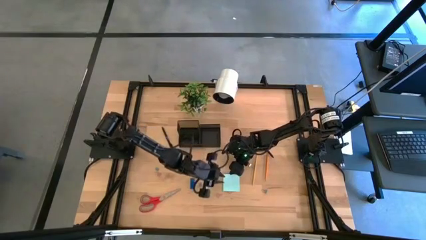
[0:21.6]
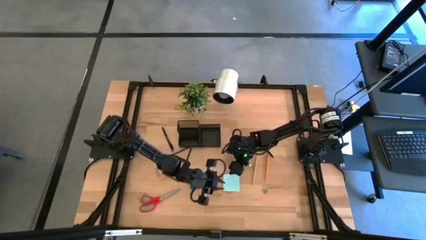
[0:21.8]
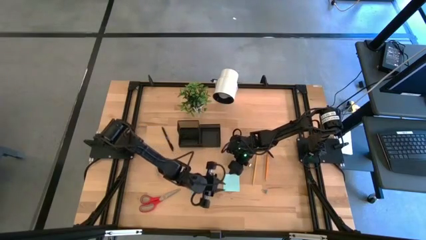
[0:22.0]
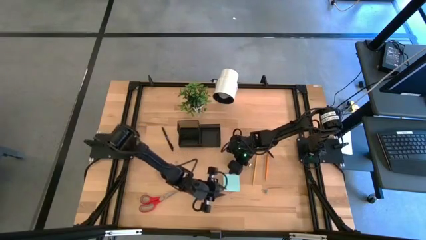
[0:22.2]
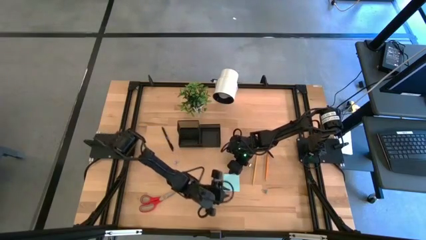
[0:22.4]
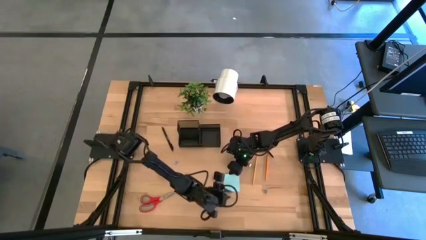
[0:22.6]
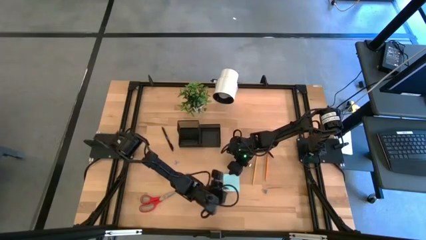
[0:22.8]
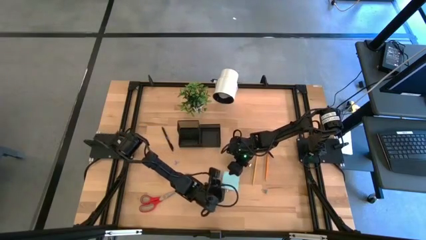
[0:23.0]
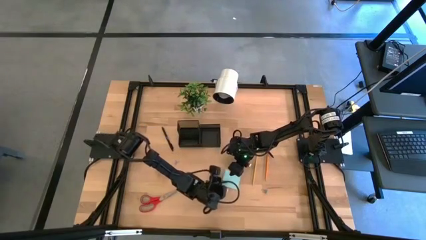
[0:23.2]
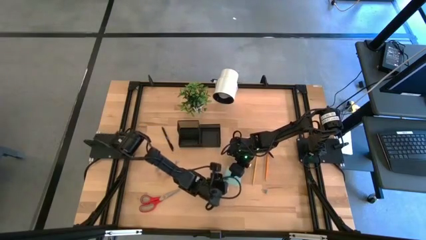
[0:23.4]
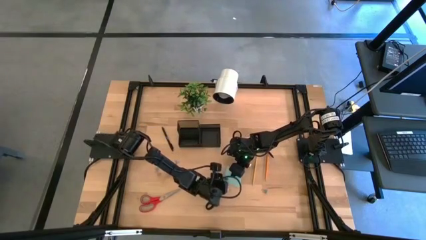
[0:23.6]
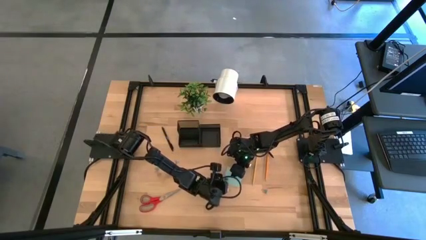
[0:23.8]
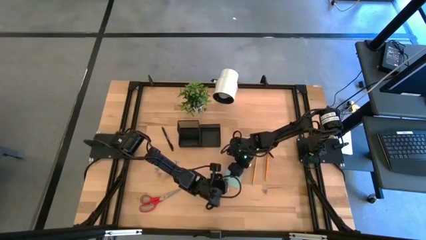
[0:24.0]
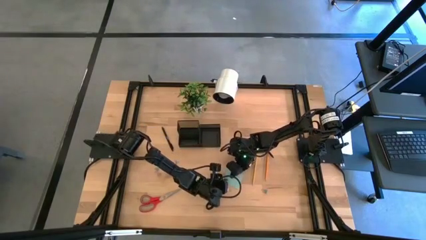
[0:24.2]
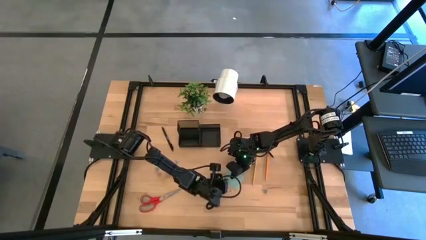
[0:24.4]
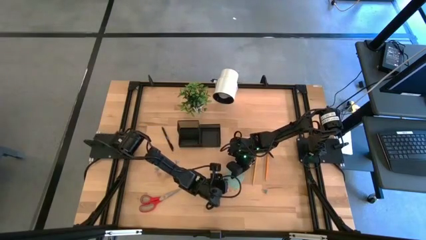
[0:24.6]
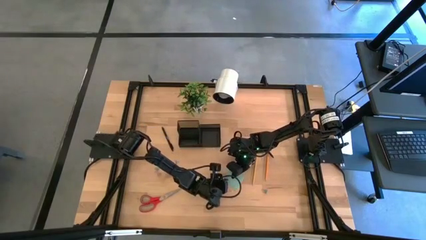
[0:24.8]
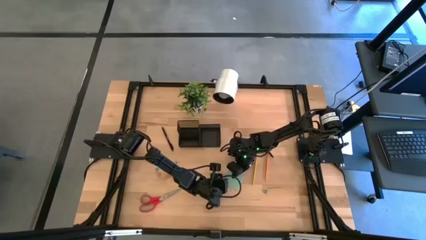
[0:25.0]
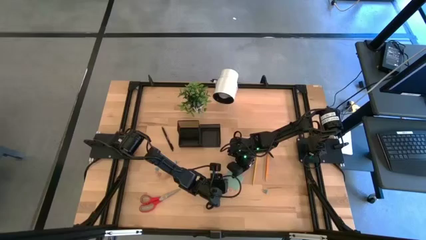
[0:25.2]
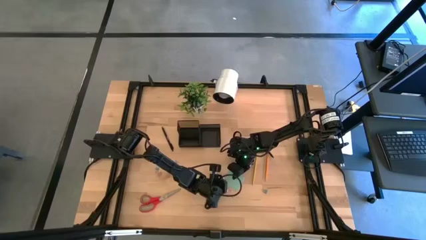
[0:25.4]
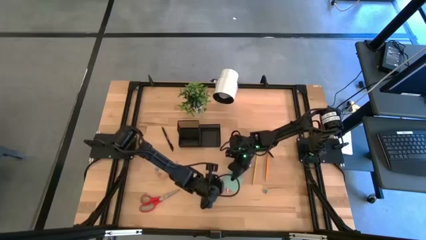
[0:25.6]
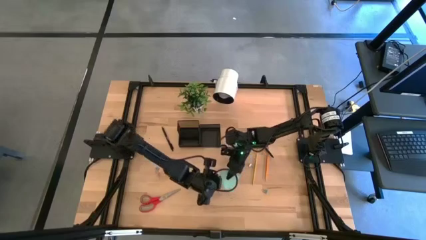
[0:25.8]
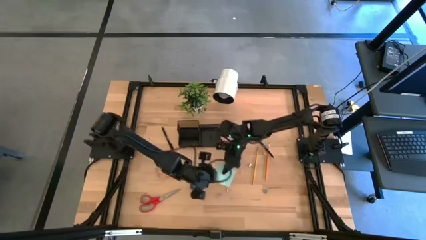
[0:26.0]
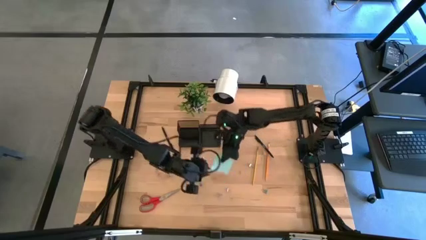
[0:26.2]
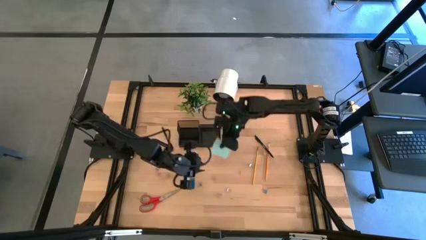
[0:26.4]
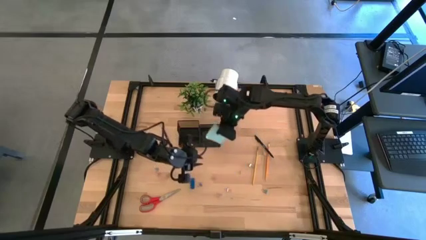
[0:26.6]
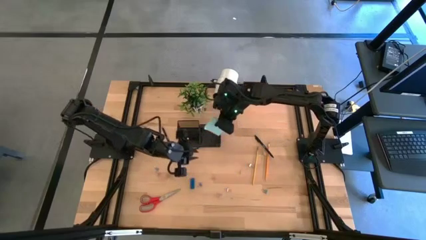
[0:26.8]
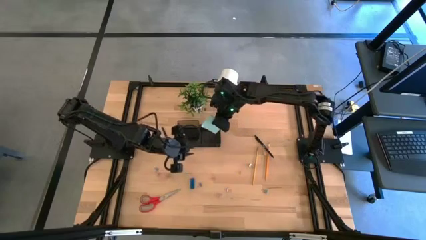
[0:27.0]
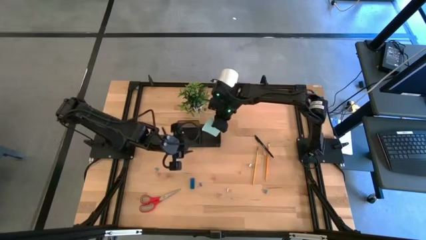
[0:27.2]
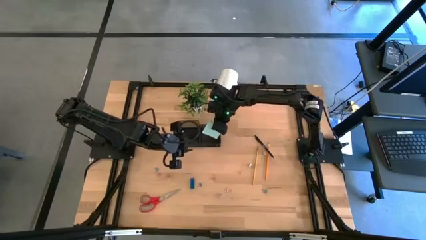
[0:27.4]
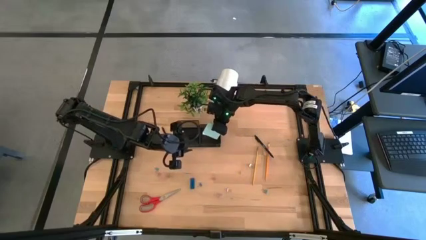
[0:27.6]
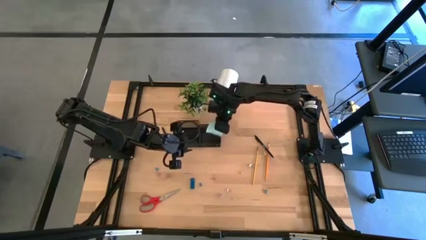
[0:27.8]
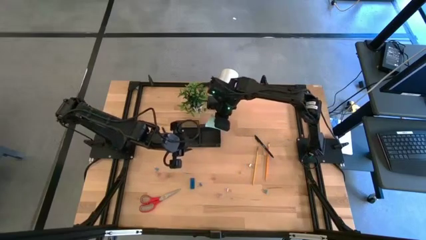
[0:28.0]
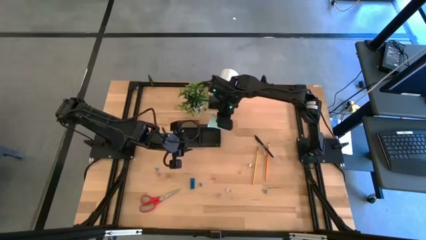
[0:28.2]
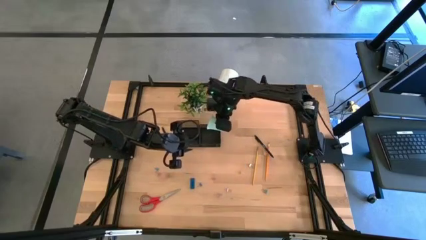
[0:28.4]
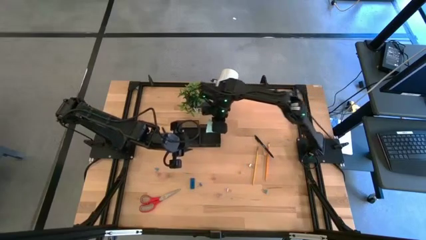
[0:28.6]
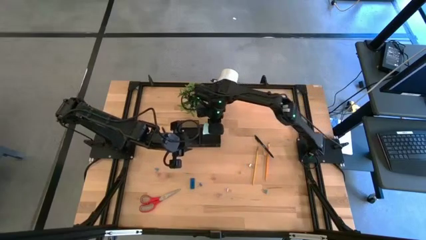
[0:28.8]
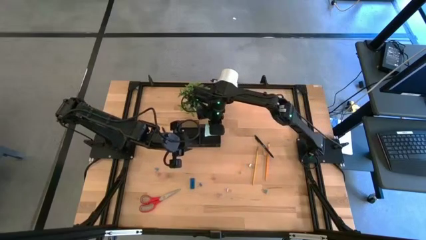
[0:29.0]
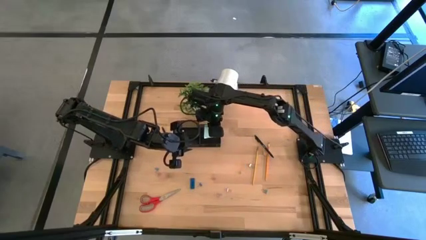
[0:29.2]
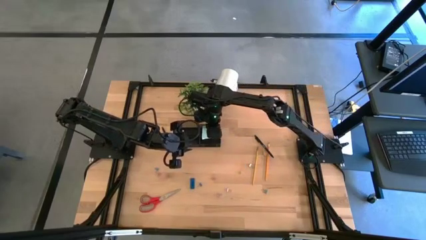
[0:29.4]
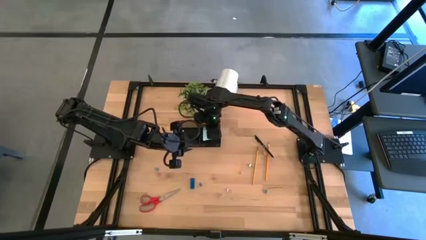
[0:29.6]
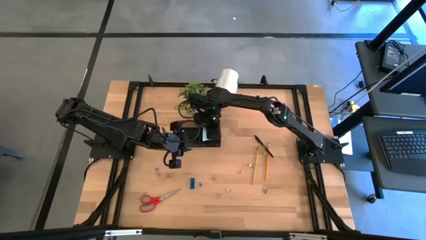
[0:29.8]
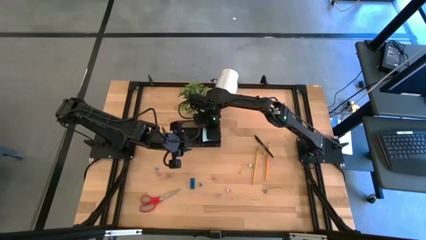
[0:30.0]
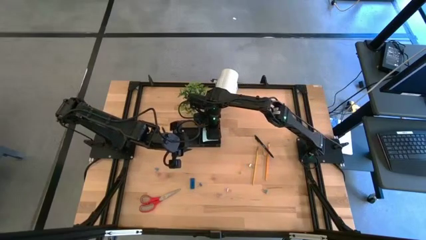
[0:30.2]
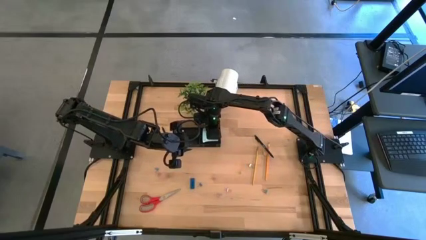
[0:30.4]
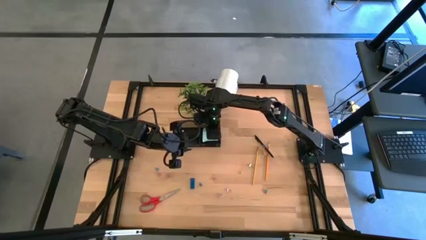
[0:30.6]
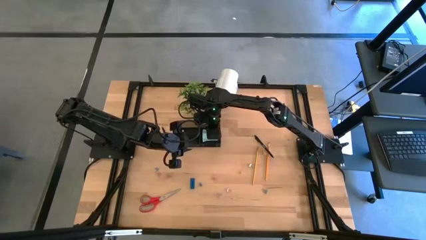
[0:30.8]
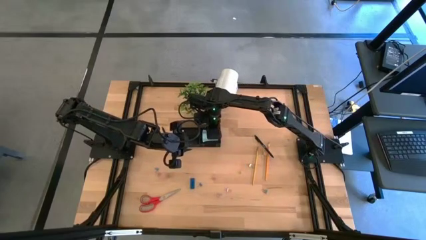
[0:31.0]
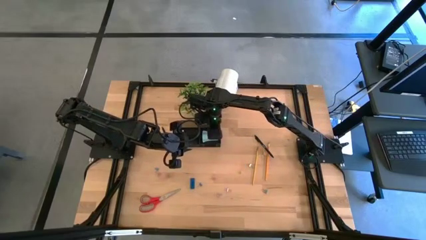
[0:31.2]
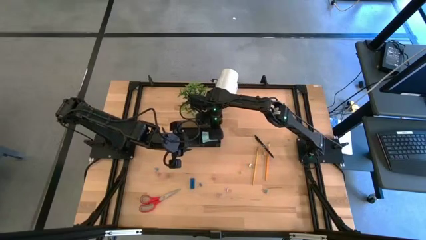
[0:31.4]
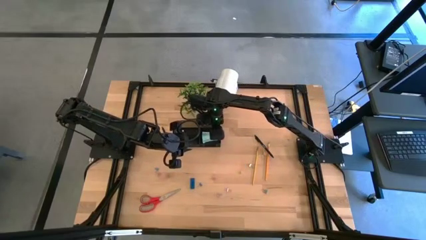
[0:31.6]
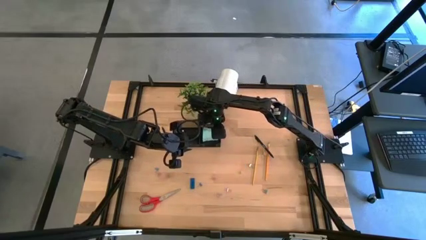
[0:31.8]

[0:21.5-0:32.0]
Task: Pick and place office supplies into organizer
Put the blue sticky note into the black desk organizer
